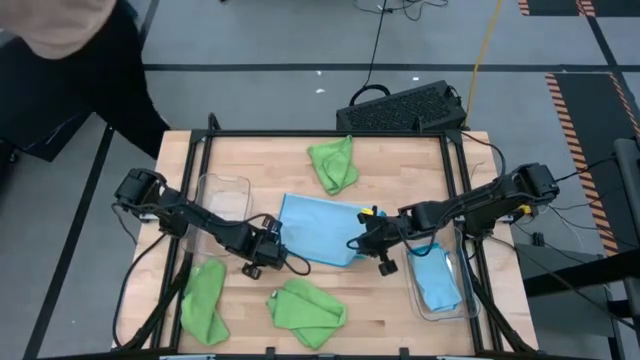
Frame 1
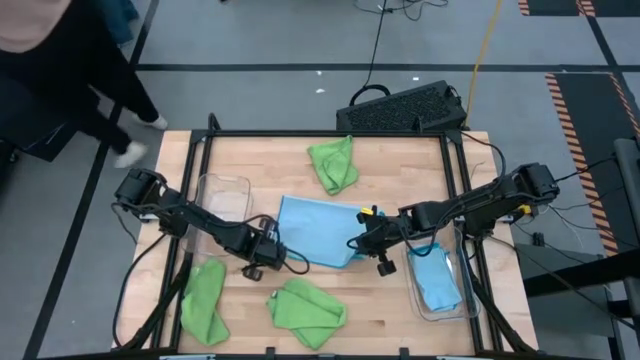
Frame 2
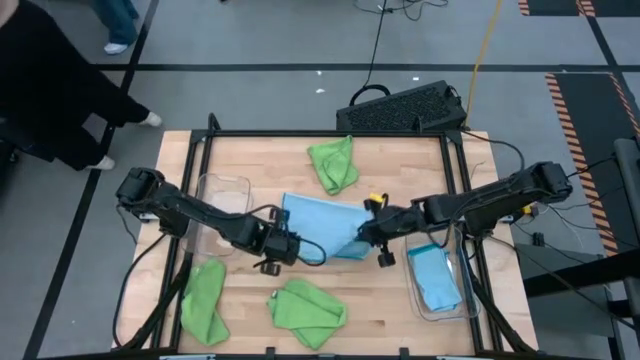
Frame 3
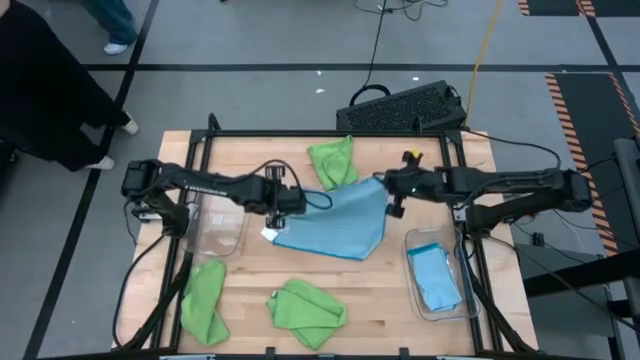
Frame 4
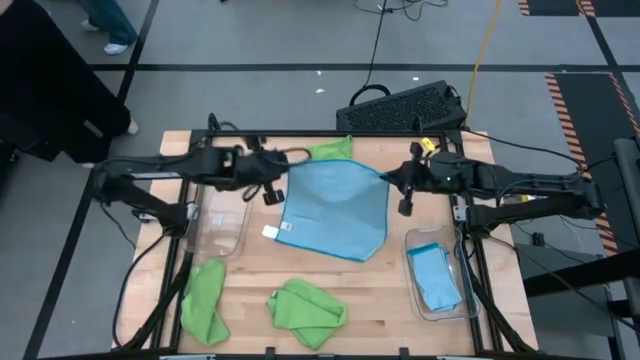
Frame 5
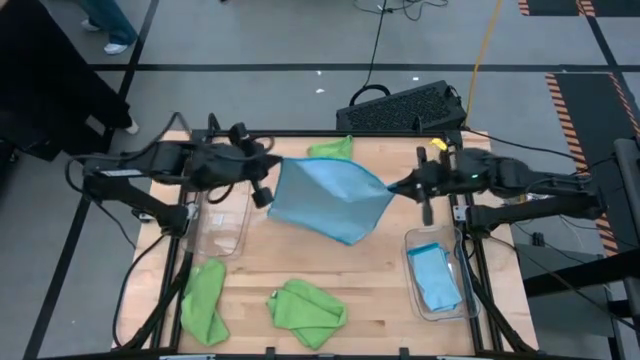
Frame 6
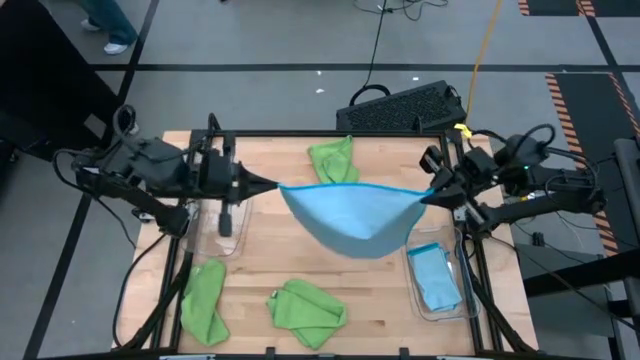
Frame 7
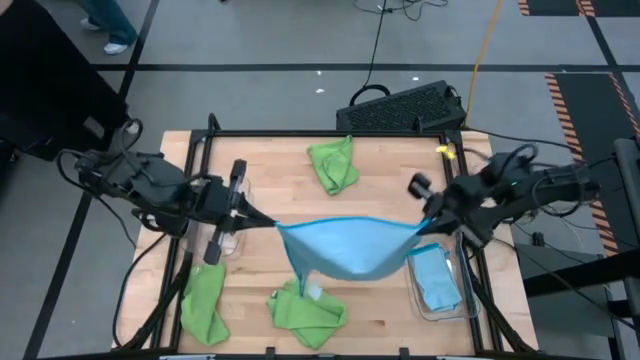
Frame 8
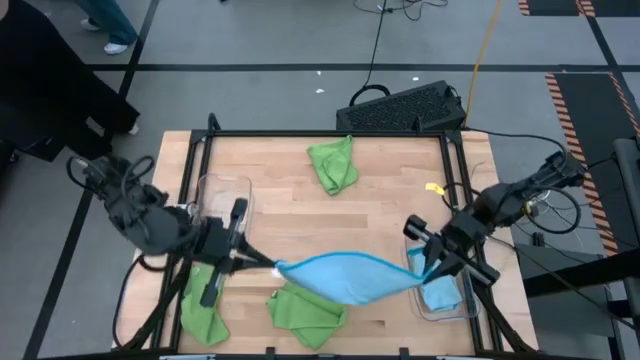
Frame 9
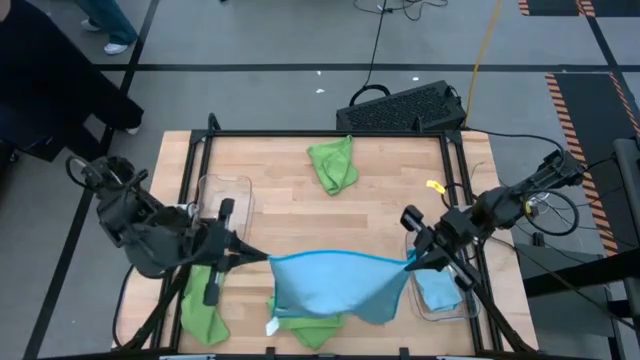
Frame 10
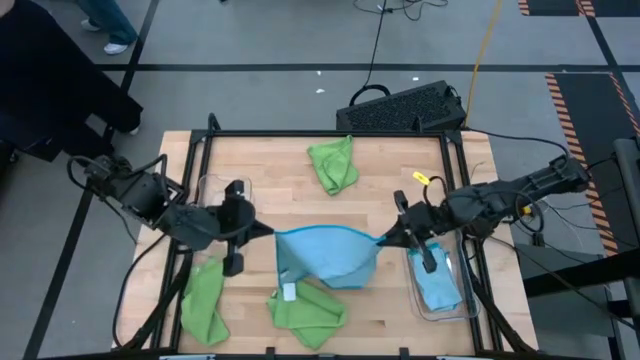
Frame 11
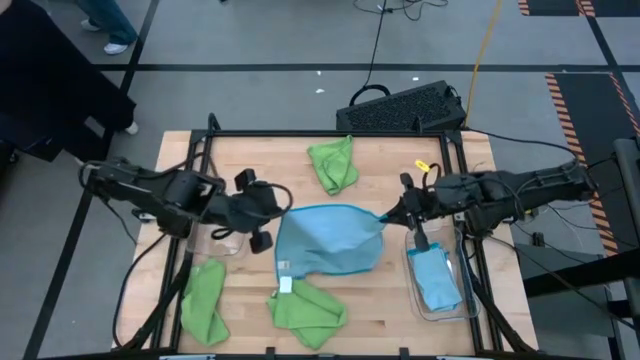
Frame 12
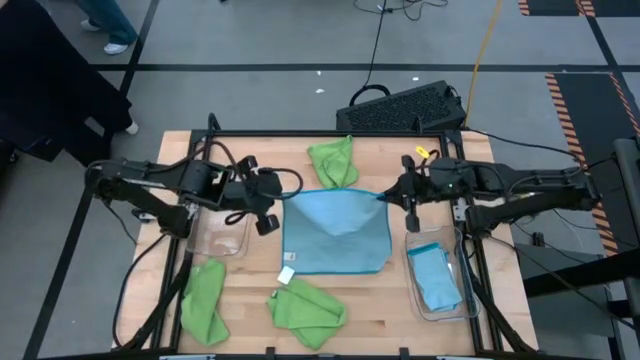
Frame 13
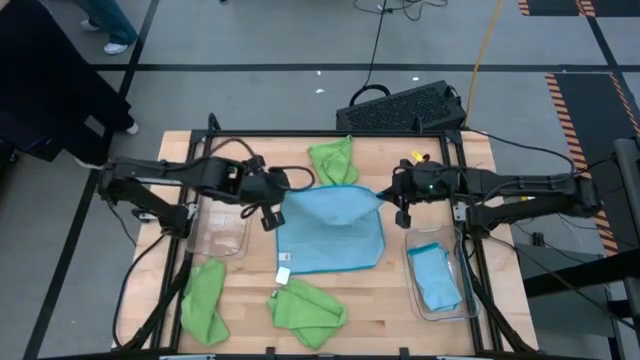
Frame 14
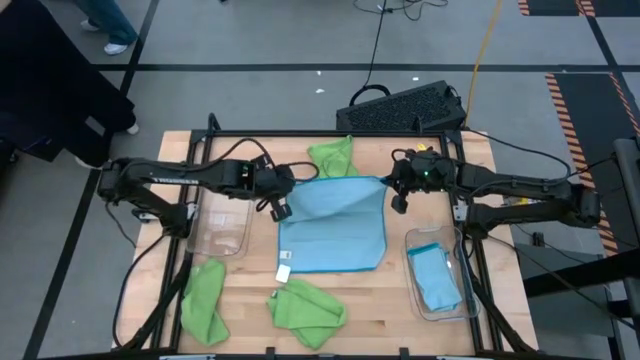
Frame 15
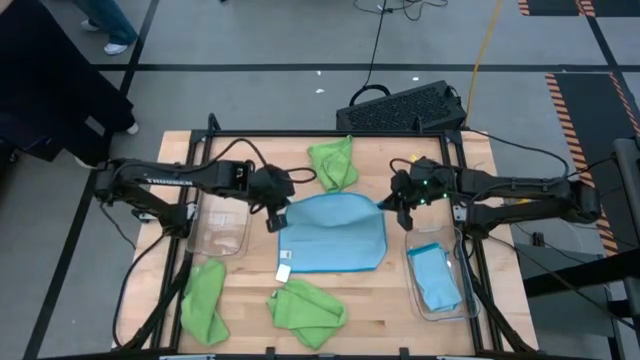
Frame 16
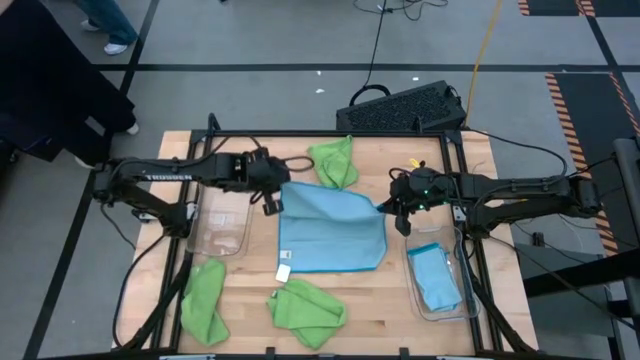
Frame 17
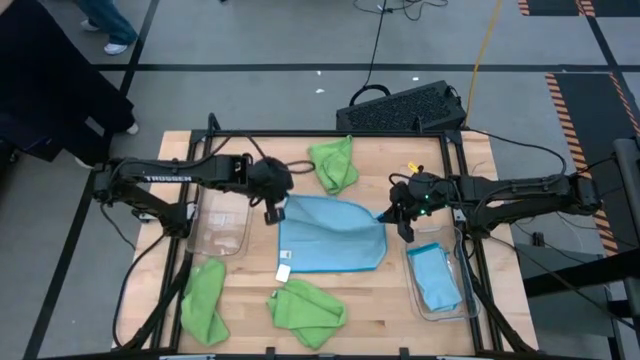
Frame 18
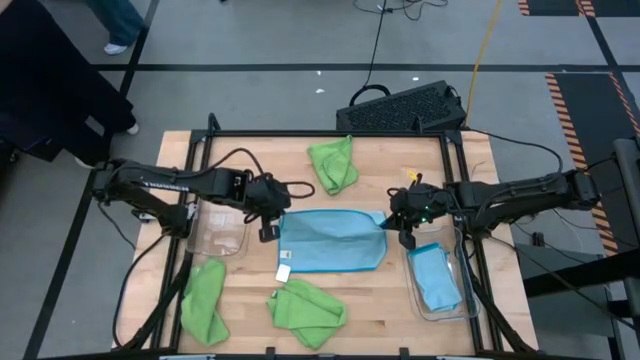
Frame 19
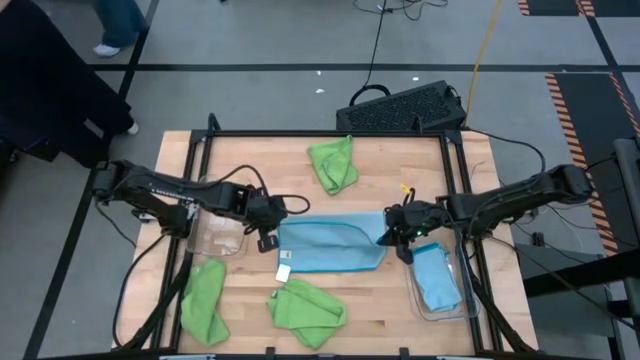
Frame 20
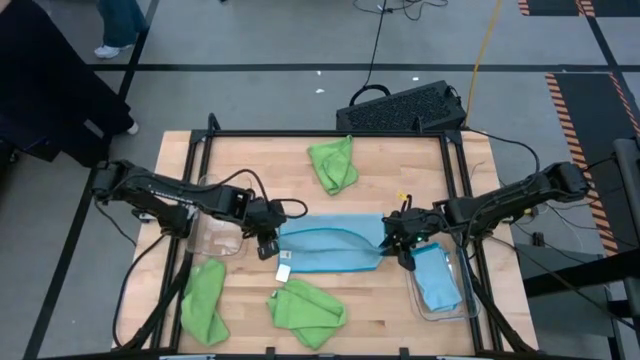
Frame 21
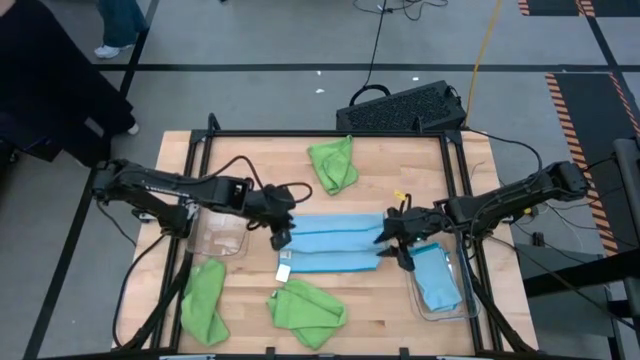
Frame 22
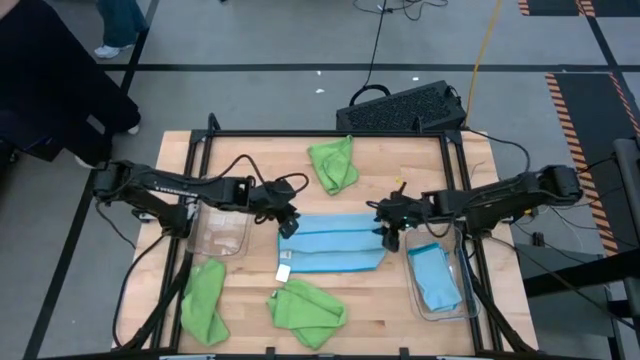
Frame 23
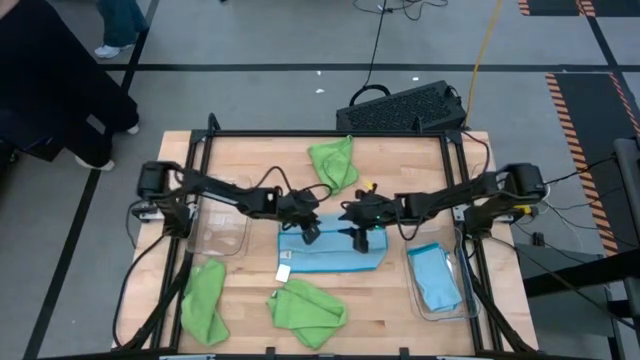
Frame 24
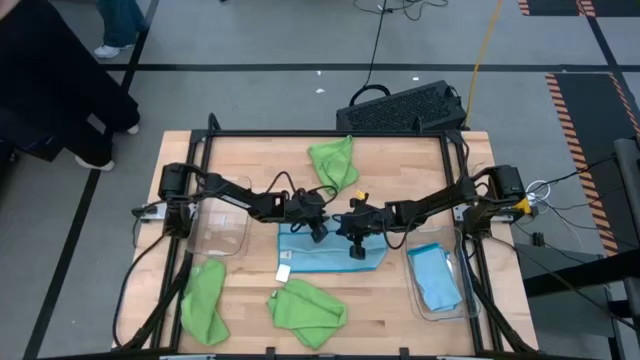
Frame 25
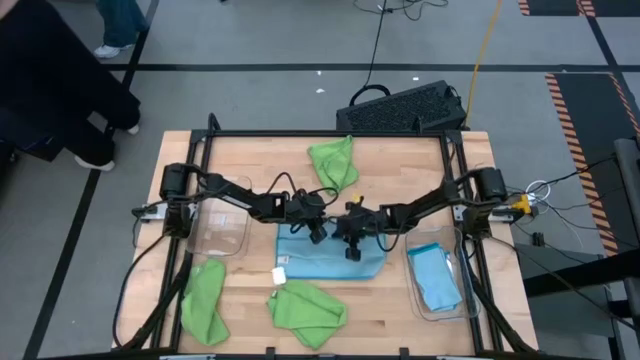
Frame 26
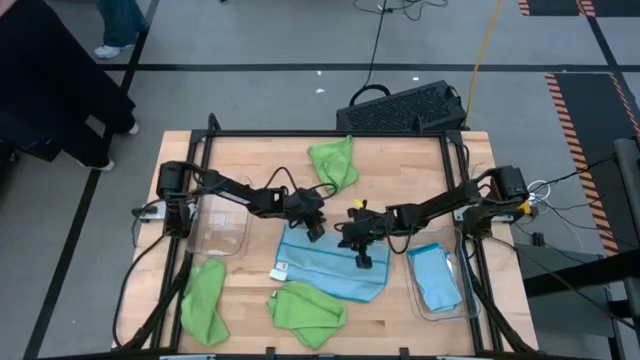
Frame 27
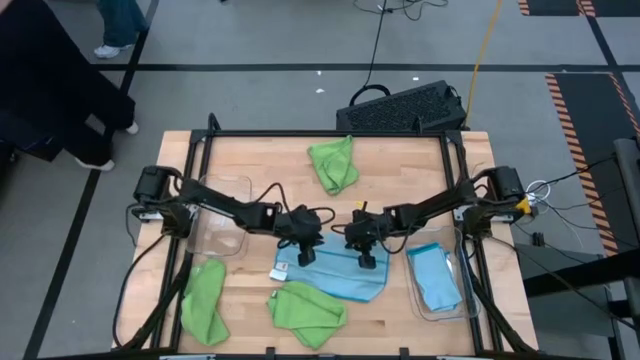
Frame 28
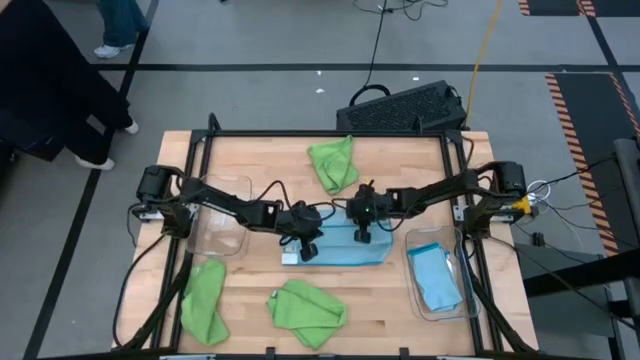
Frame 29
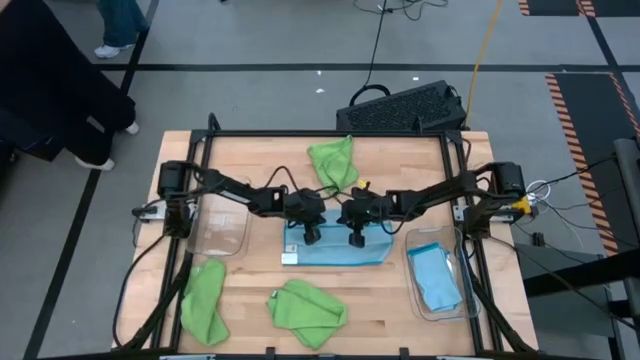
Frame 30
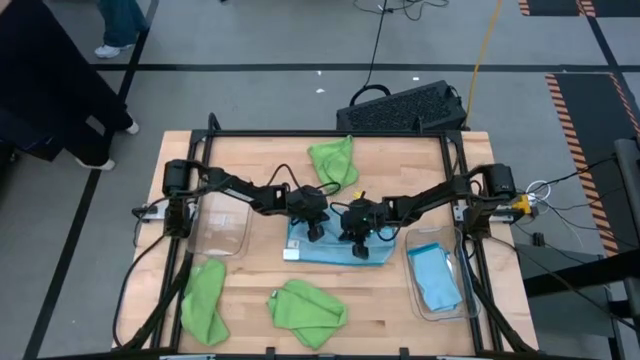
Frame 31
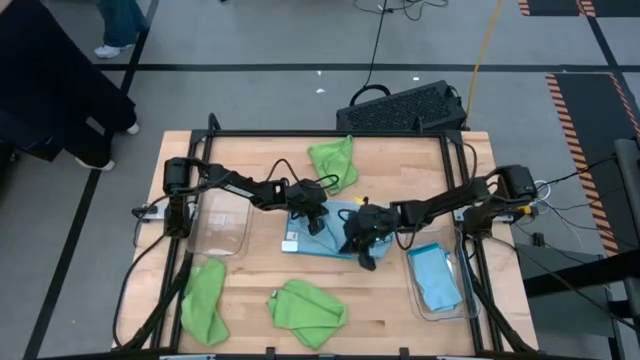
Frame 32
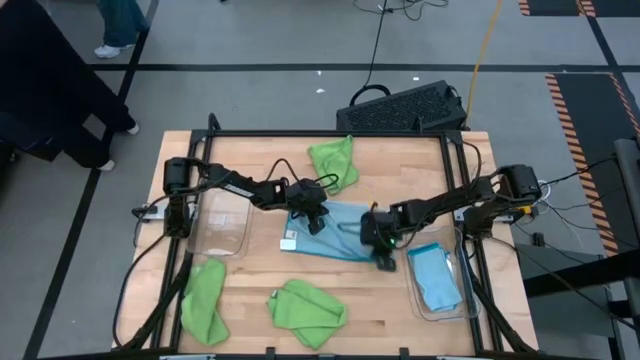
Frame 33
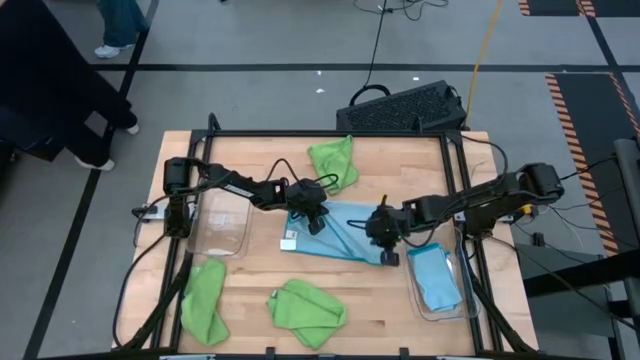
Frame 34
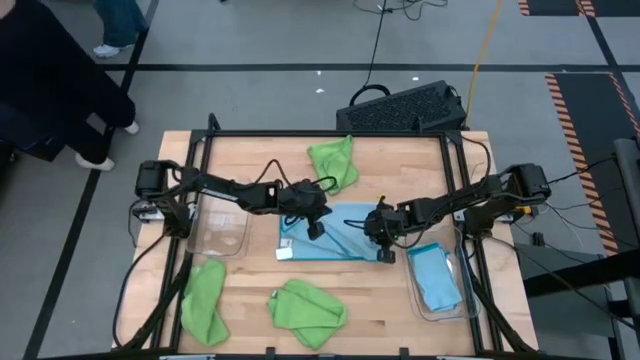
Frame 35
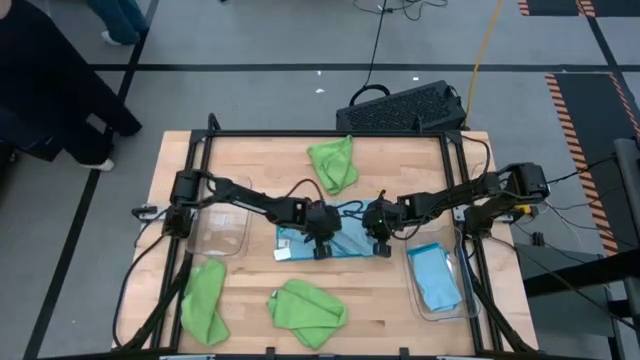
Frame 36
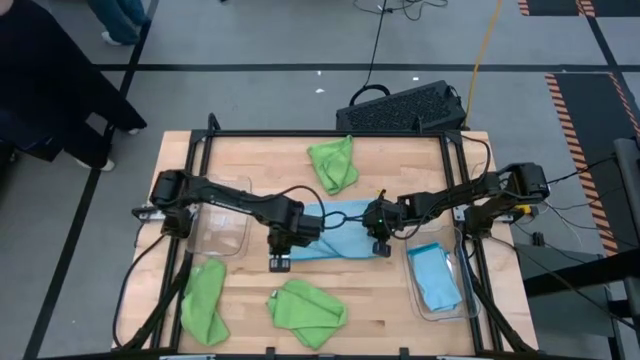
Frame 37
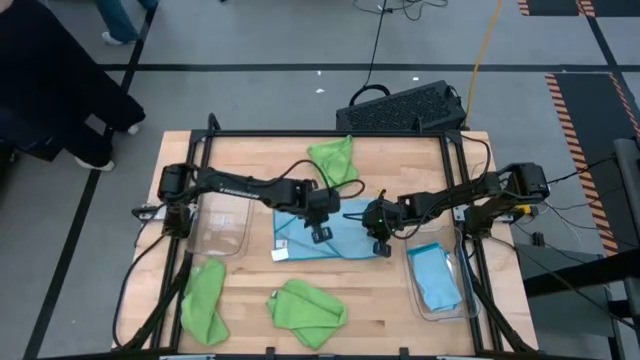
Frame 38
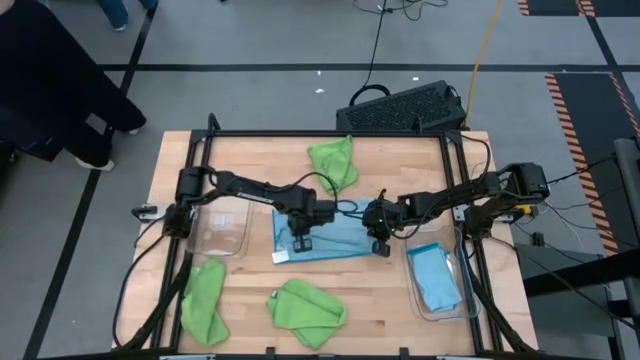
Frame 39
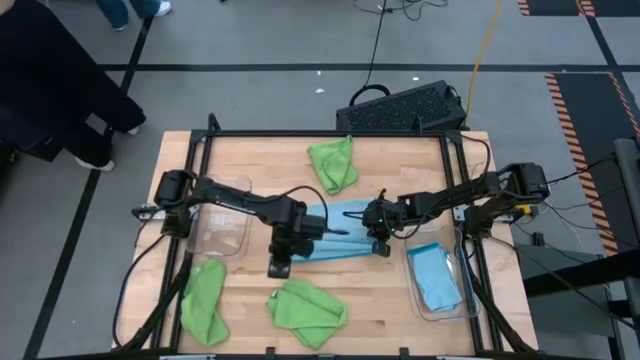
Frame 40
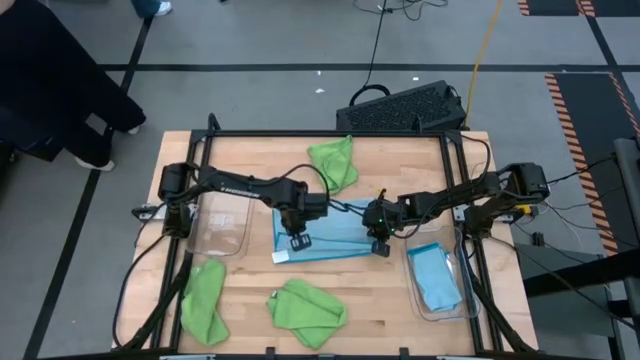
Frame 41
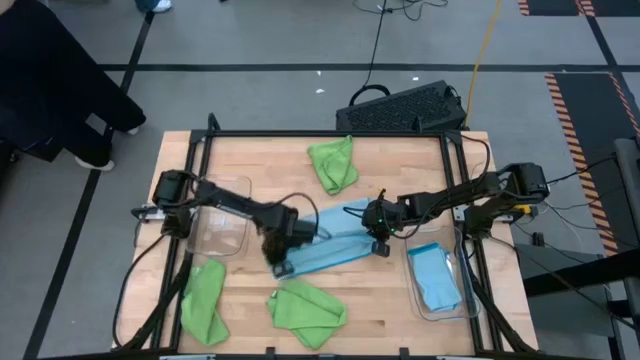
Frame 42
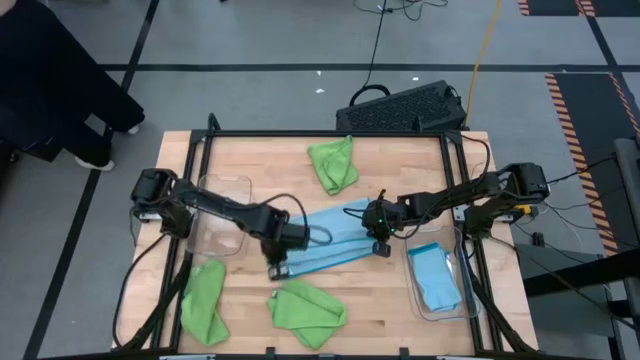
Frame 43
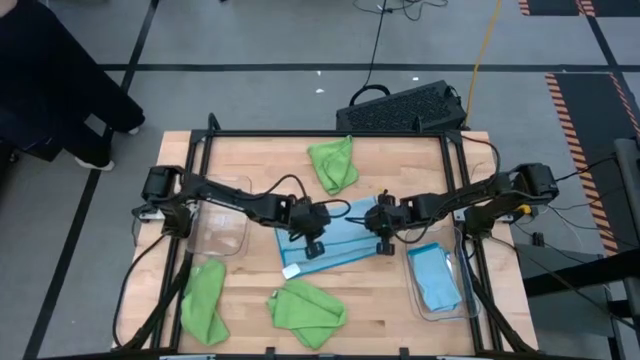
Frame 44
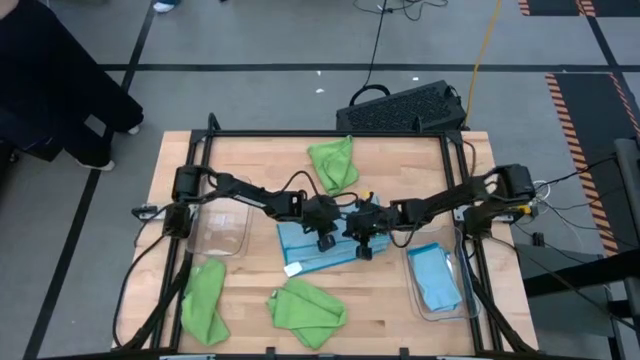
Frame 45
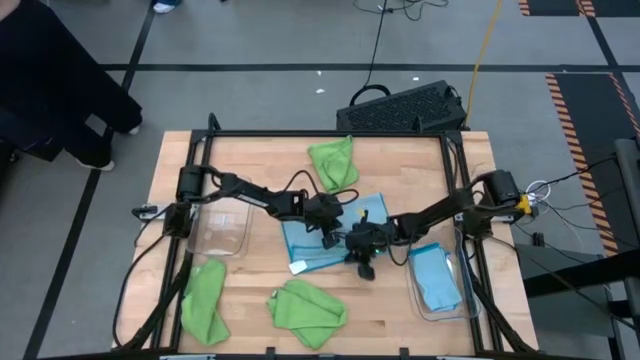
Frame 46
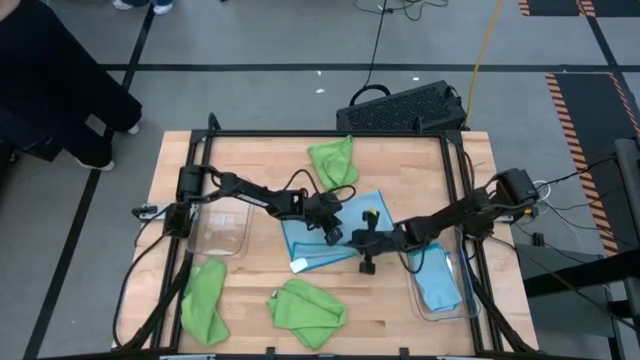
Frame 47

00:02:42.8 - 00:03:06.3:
Task: Sort microfiber towel by color & place in baskets
Fold the blue microfiber towel
